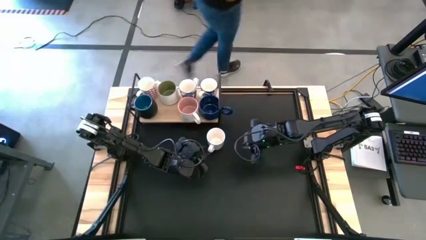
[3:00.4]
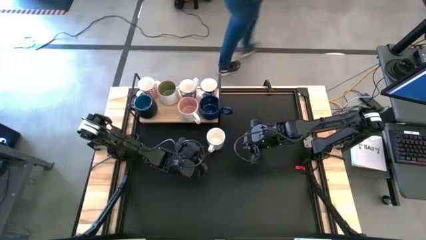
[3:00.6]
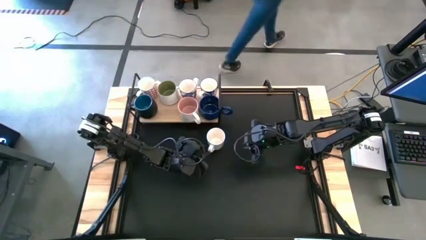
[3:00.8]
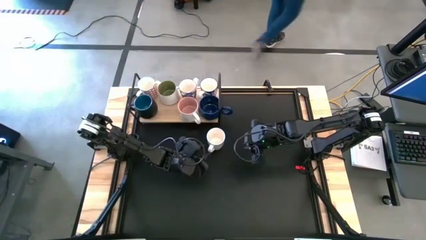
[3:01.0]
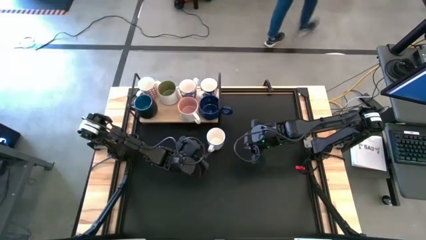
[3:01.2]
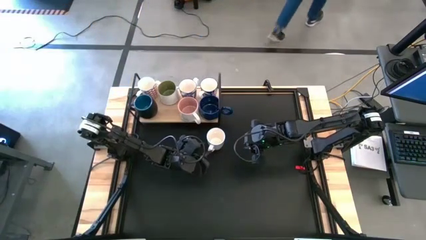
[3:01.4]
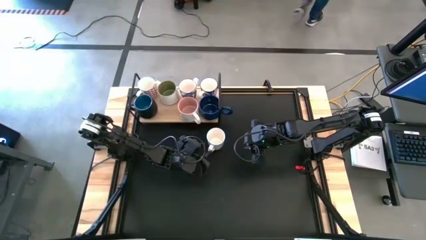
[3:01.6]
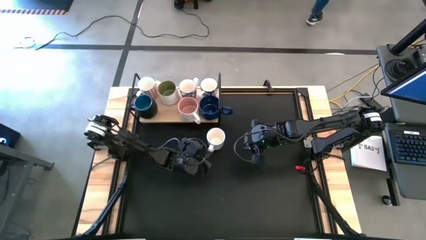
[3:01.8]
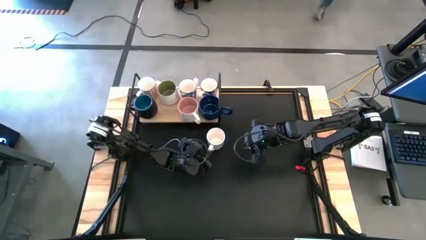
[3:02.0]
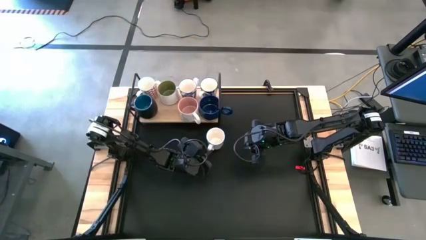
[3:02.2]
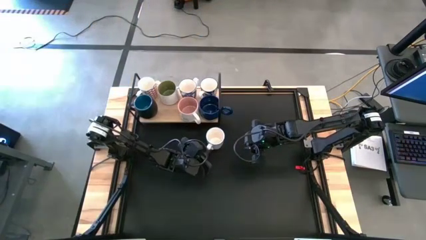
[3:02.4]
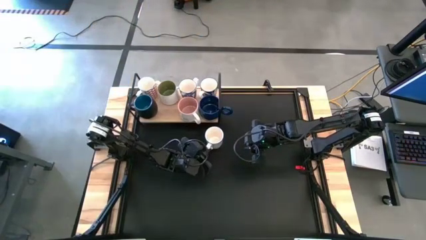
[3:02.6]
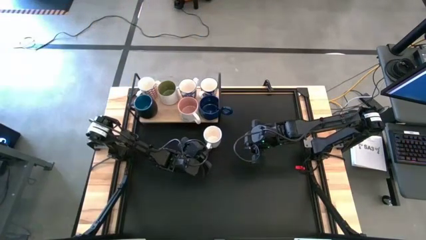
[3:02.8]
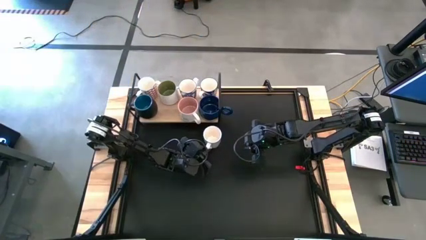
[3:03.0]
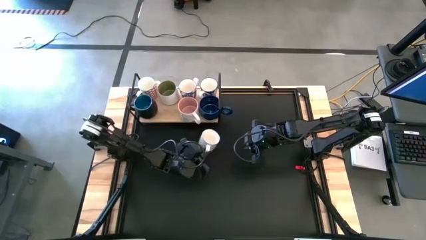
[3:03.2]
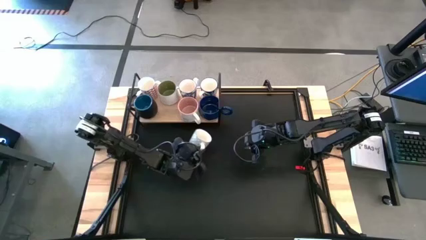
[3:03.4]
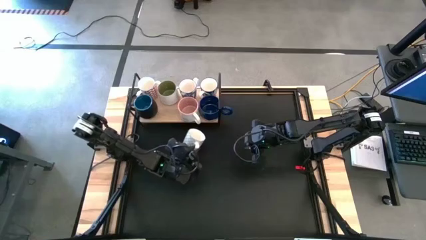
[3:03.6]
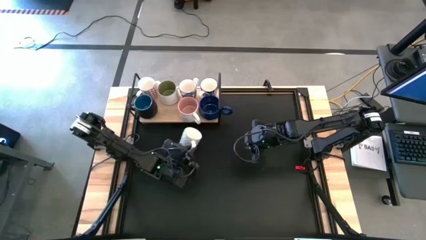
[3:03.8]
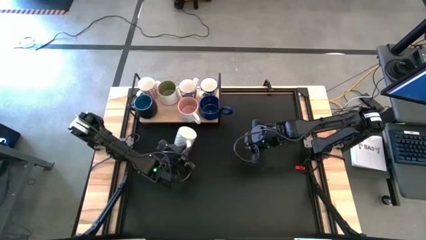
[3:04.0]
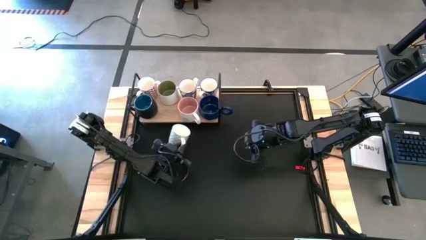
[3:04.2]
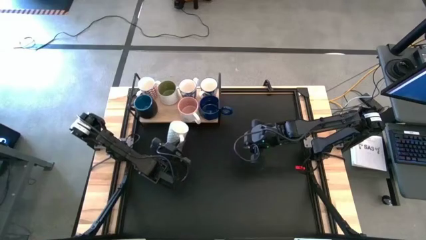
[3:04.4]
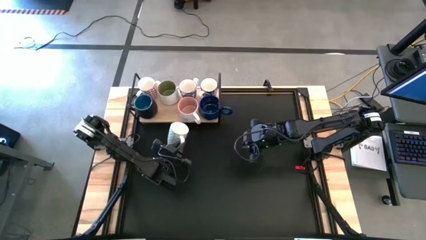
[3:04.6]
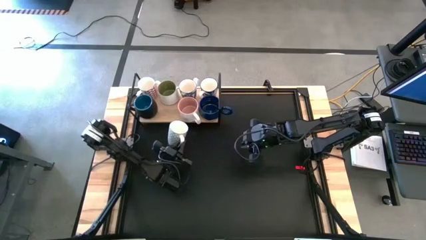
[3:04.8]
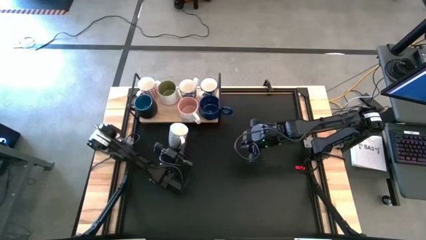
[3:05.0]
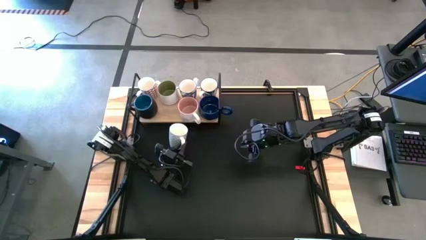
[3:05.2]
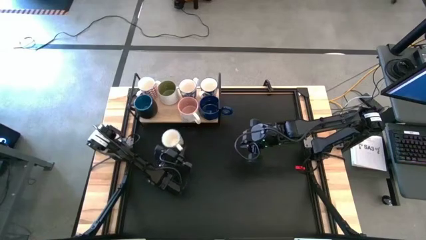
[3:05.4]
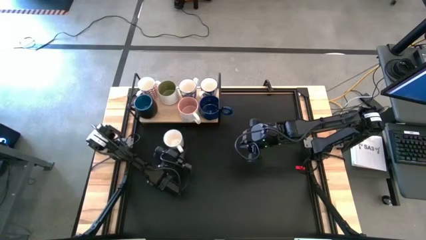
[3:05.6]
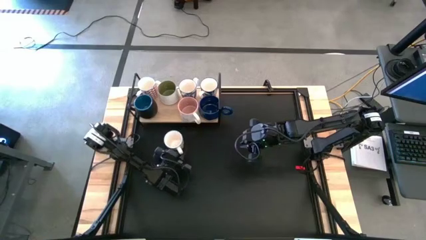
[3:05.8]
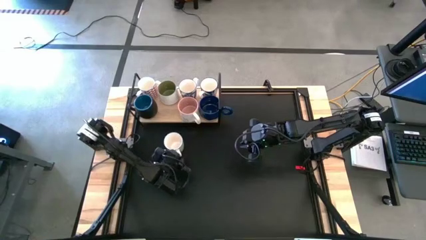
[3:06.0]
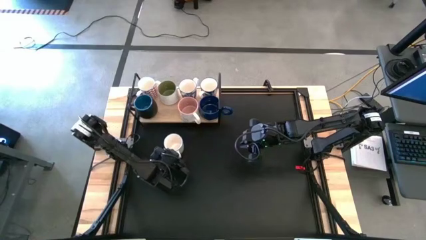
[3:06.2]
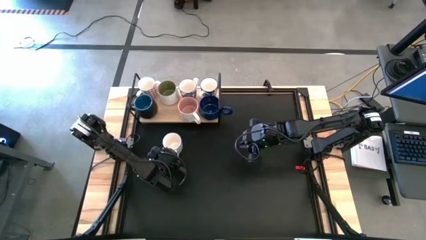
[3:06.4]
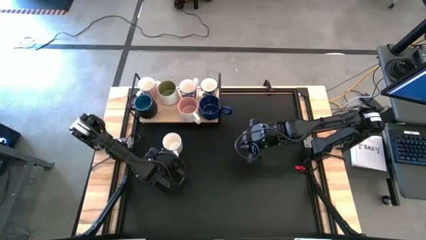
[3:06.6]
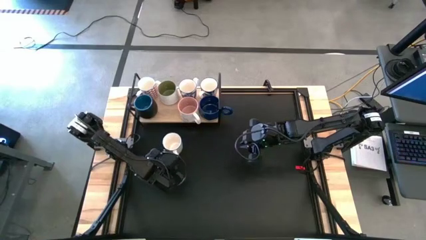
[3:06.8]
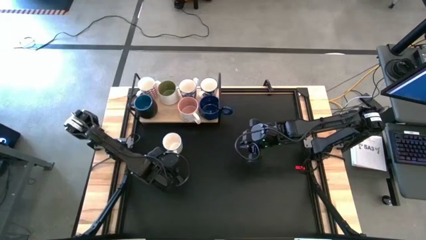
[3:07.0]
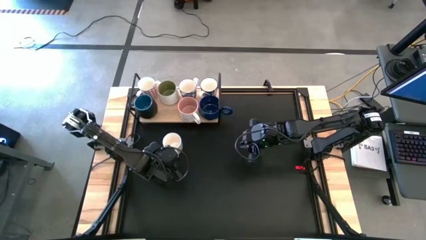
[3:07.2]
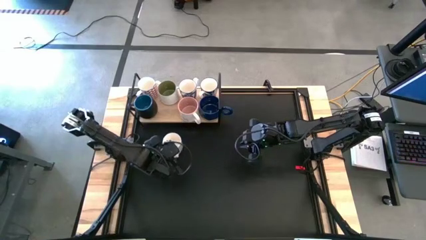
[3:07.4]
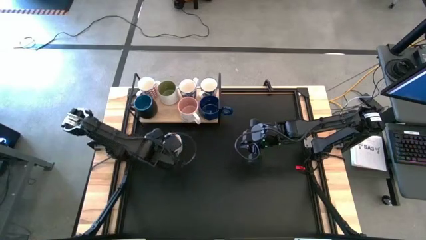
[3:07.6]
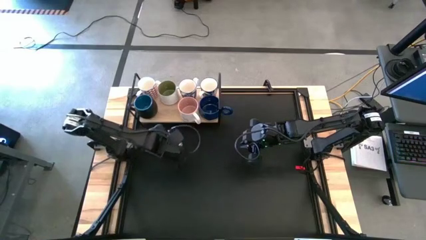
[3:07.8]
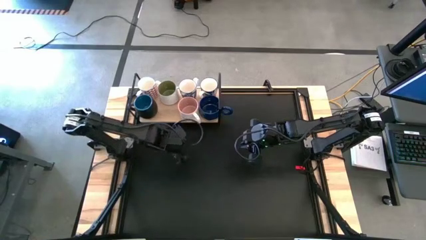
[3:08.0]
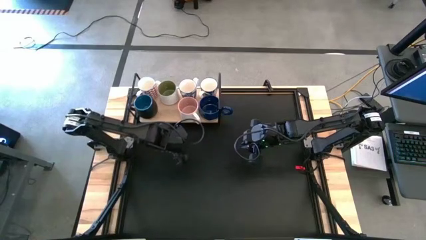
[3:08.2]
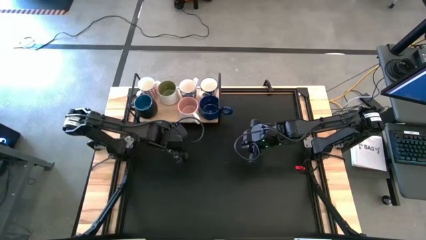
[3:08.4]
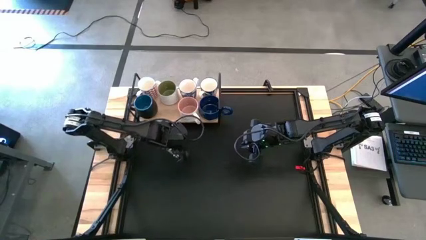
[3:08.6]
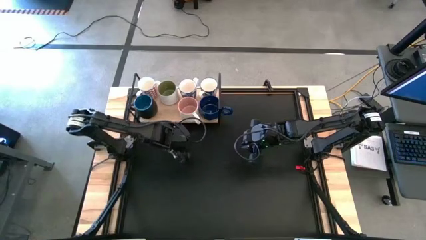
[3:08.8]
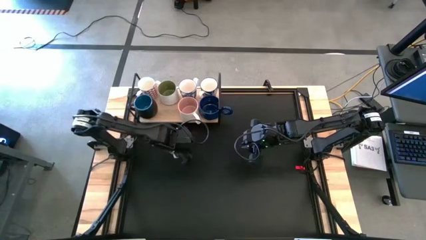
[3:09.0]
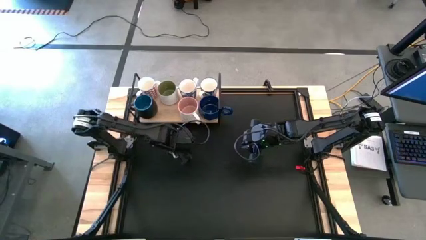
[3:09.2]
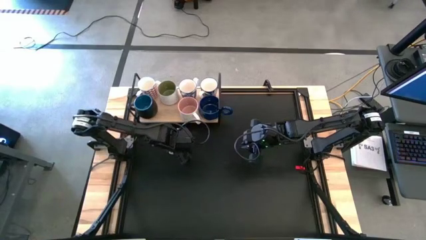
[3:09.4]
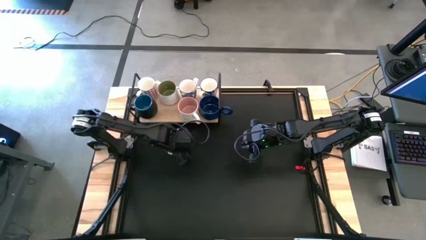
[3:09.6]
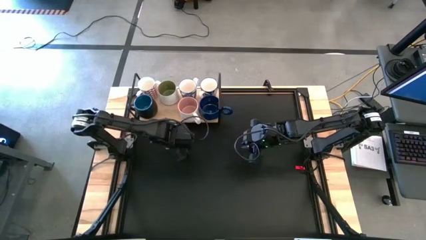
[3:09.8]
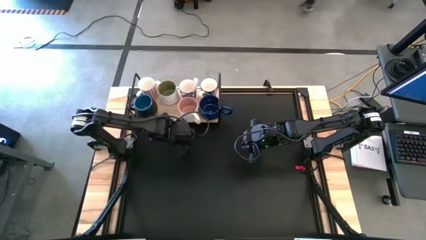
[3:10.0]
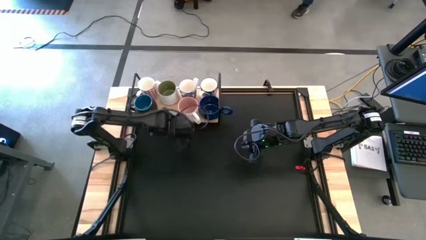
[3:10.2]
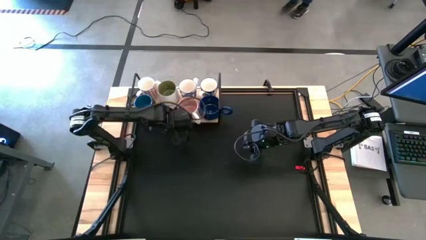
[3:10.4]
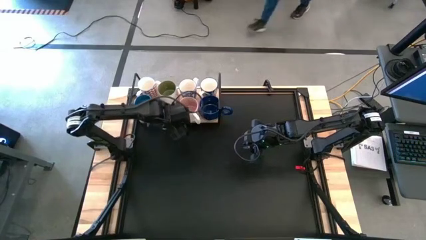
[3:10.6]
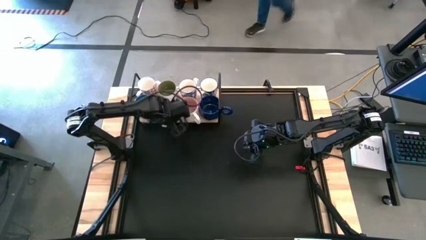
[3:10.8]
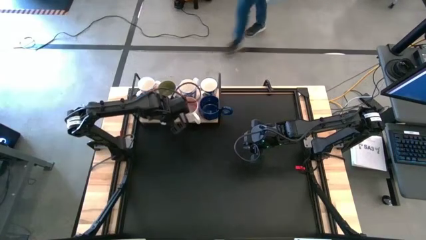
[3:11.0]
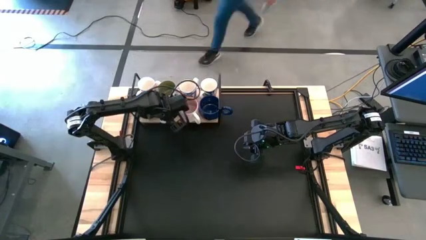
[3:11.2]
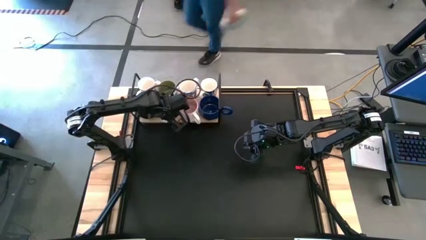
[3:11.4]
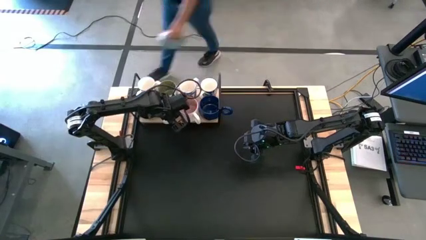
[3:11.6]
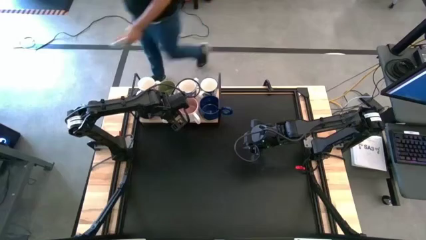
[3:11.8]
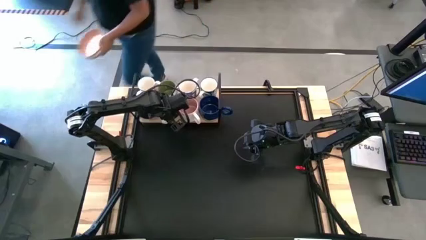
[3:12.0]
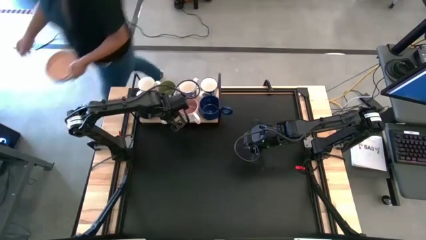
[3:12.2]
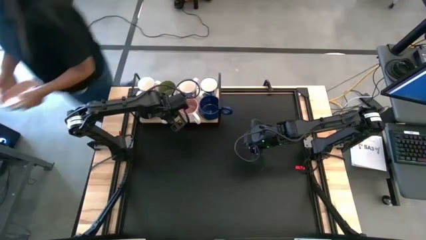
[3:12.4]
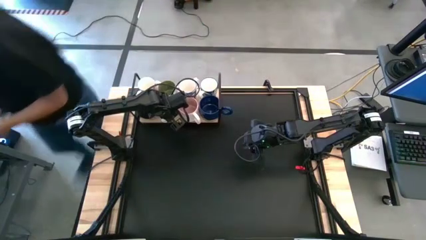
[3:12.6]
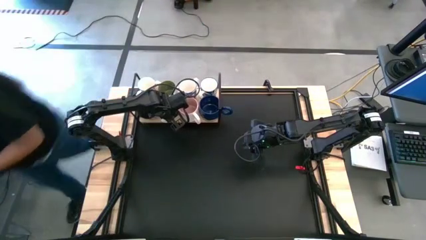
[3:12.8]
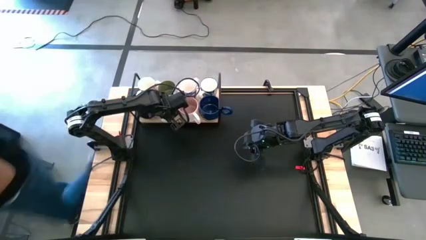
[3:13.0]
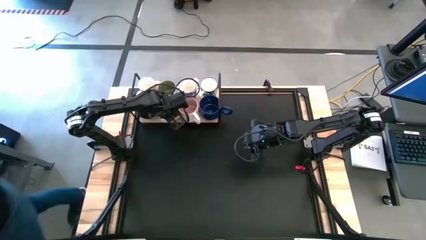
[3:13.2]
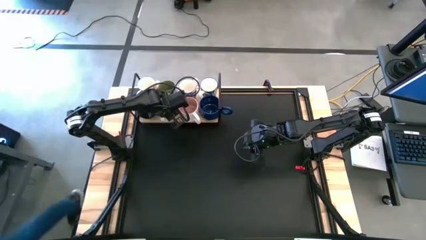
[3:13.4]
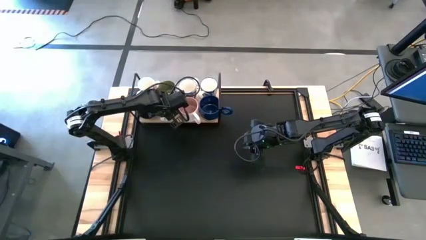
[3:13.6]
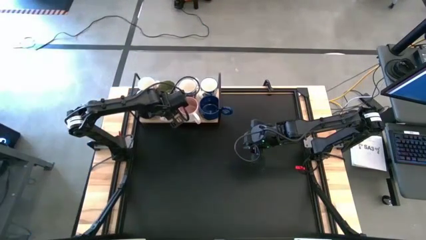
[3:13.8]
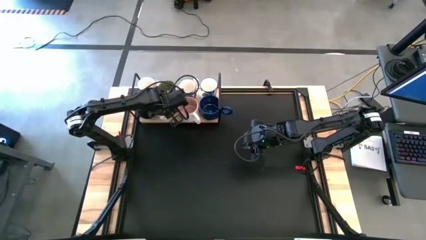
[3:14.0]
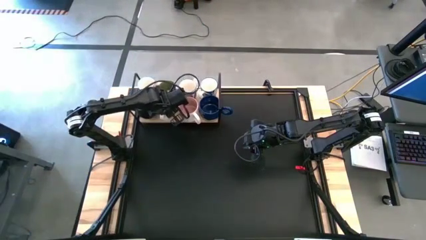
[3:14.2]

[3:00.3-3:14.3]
Task: Place coffee mugs
Put the gray patterned mug on the shelf

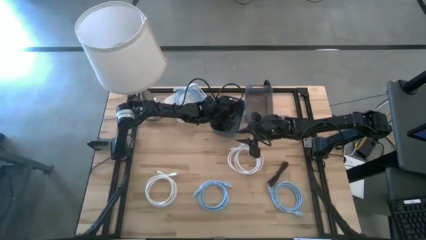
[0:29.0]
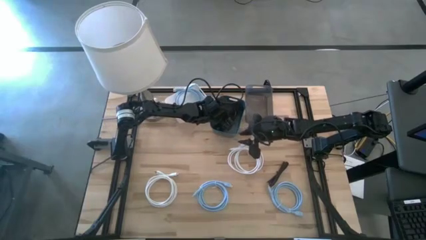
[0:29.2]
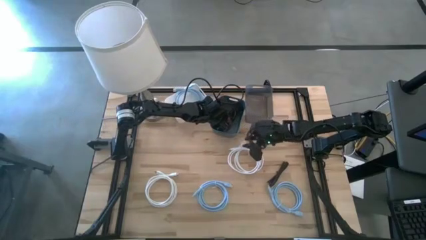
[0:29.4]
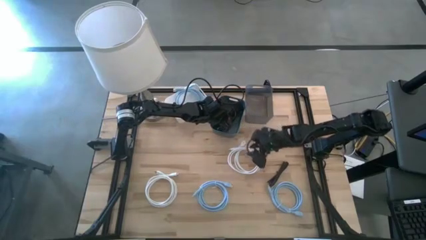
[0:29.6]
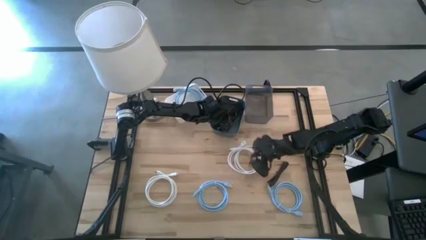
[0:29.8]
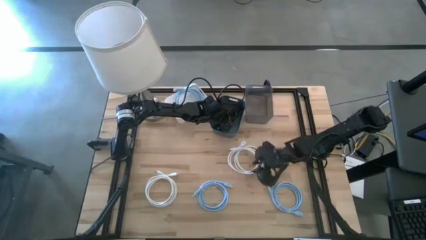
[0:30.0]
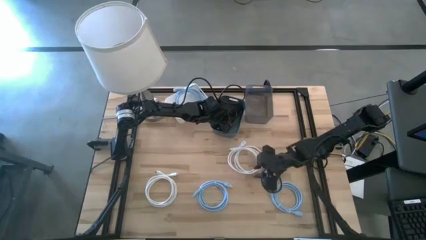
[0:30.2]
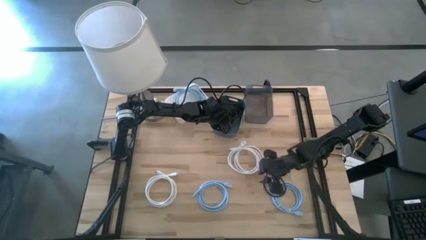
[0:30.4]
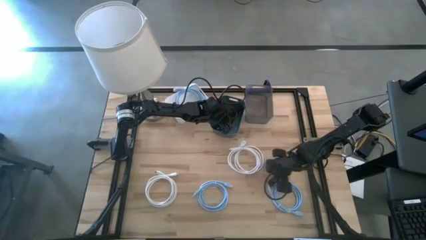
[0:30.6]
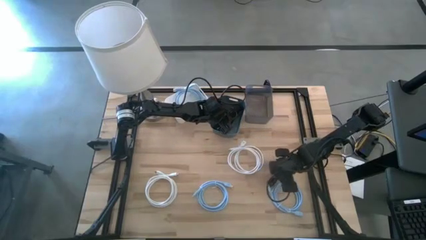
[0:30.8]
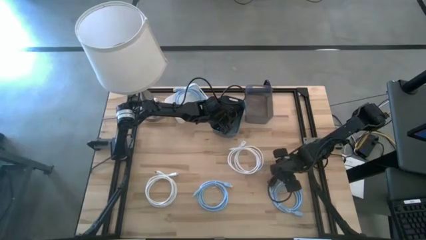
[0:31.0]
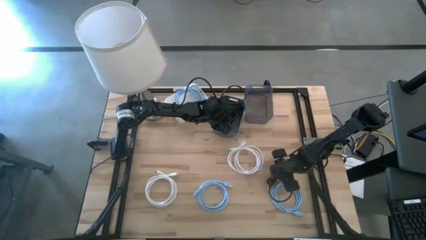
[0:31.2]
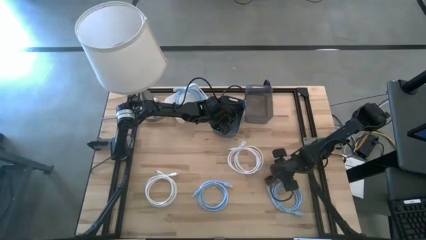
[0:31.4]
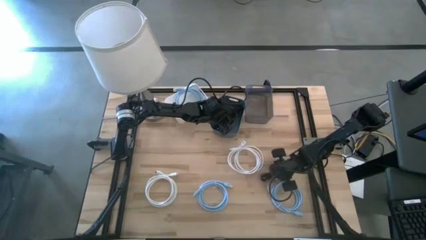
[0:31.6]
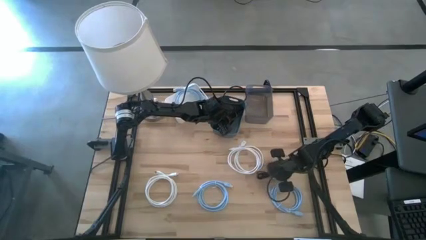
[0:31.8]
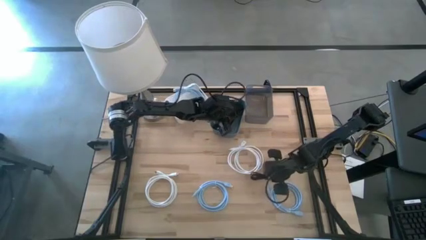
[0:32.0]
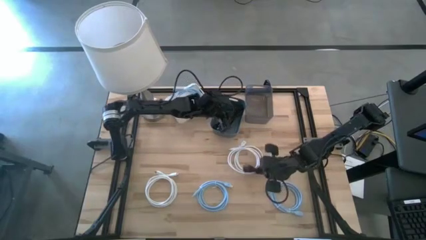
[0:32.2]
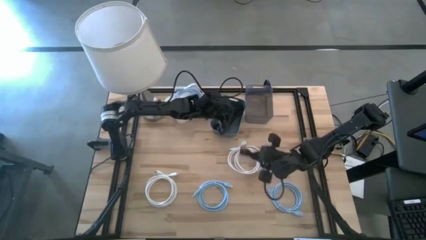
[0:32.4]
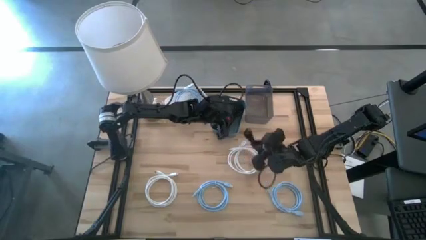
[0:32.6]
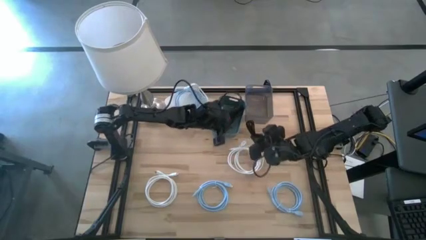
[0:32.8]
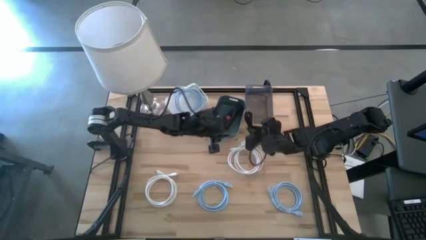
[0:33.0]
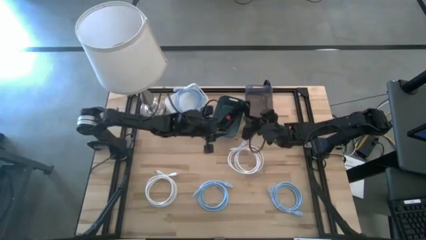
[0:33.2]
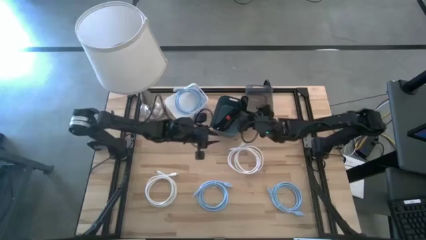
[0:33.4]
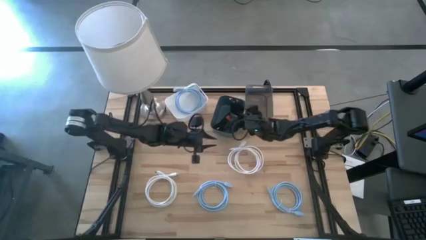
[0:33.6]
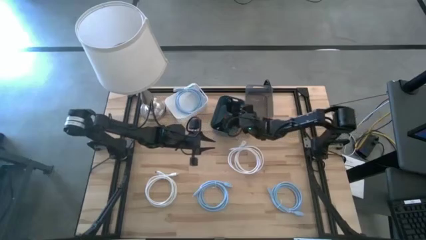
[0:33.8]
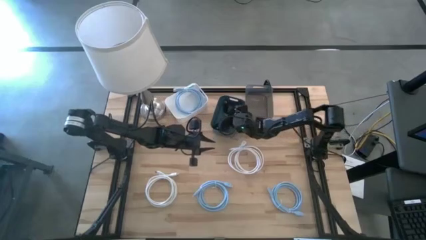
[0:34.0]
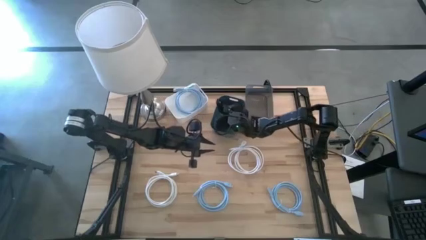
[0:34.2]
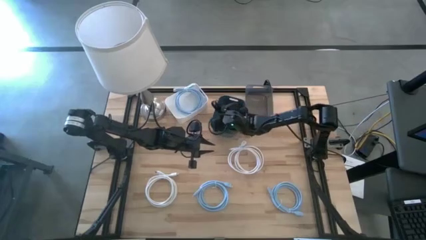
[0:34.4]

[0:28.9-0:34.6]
Task: Pick & Place USB Port
Put the black cable into the blue bin
